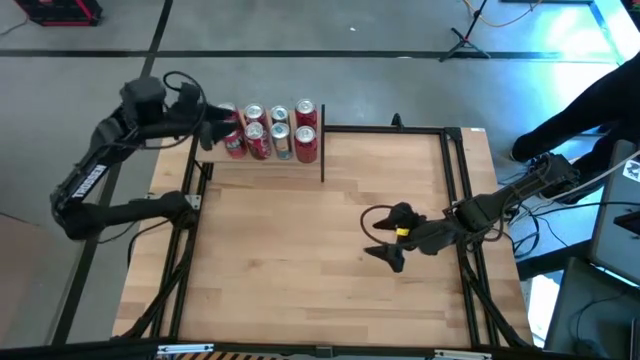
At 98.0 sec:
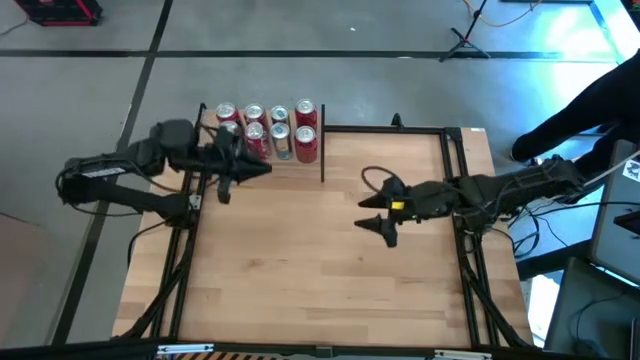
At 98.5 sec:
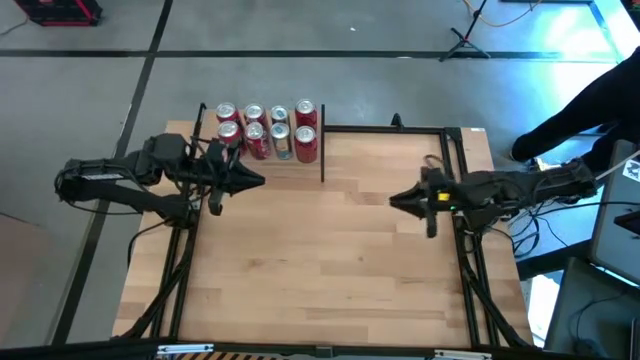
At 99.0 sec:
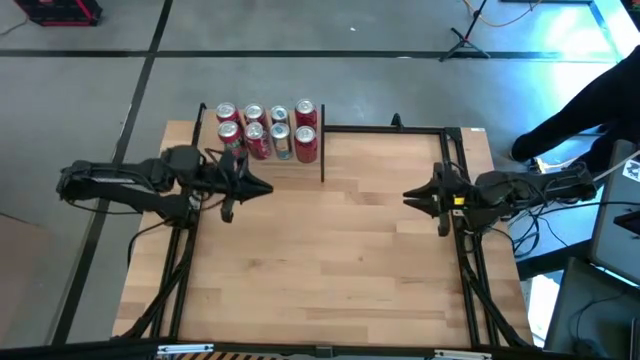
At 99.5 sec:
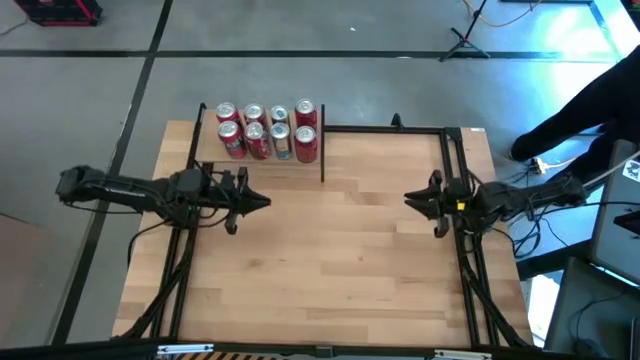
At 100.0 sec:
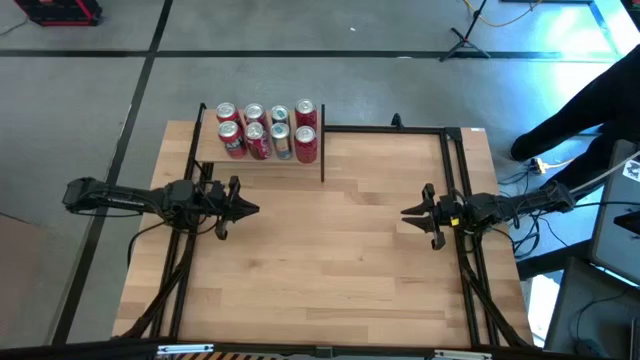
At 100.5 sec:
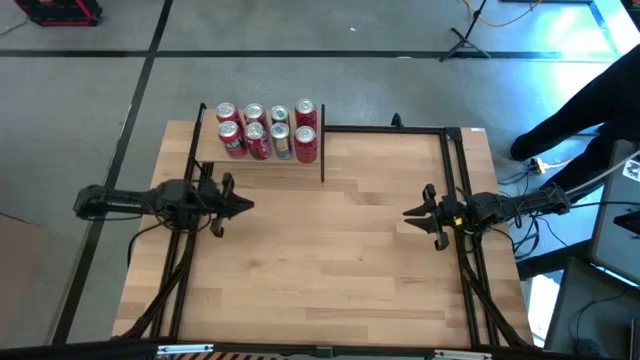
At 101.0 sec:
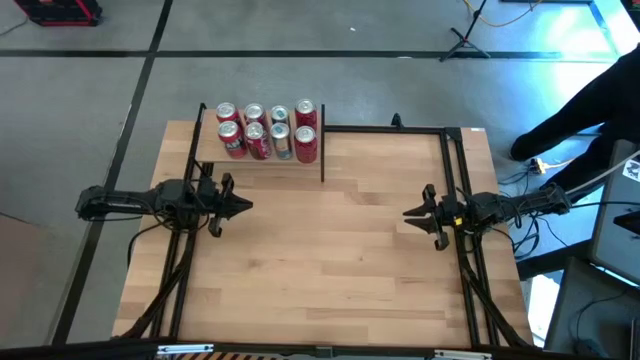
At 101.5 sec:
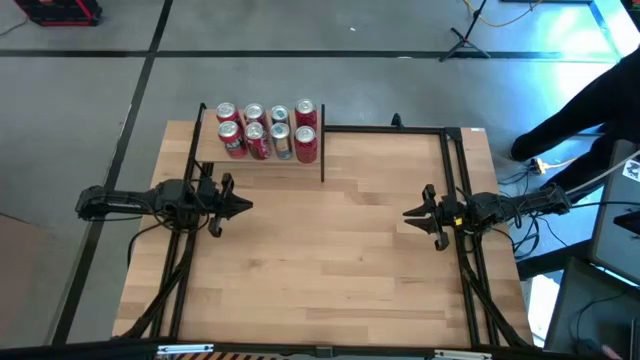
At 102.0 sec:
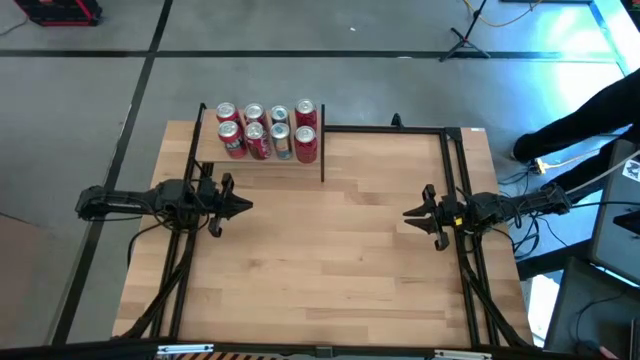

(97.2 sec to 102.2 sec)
Task: Place canned beverage on shelf
Return to Home Position

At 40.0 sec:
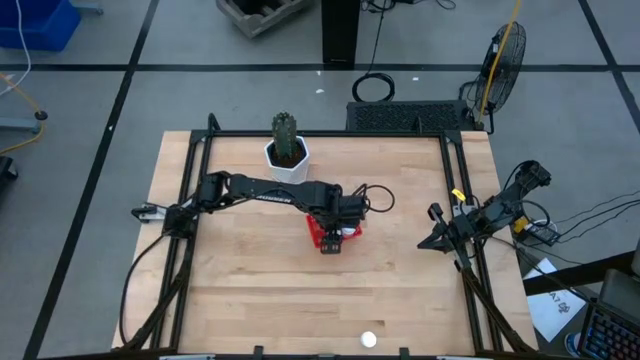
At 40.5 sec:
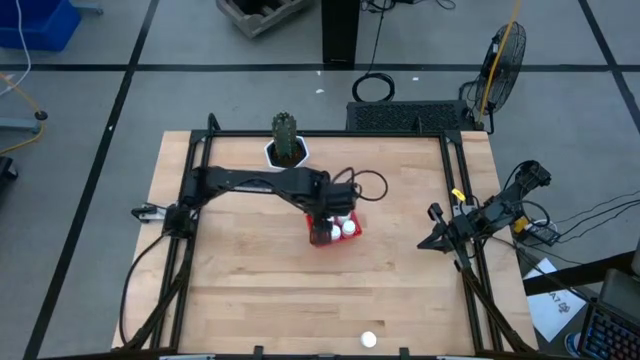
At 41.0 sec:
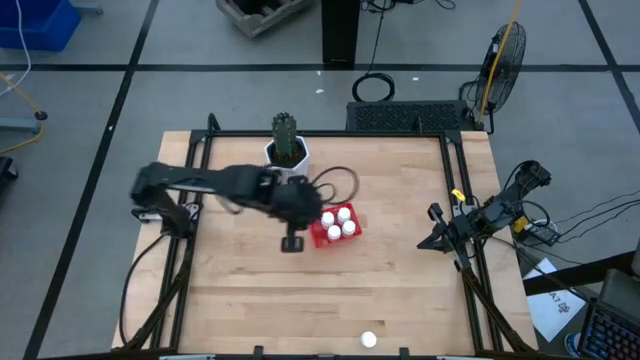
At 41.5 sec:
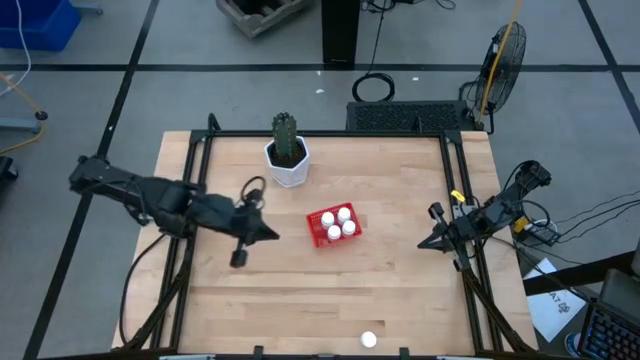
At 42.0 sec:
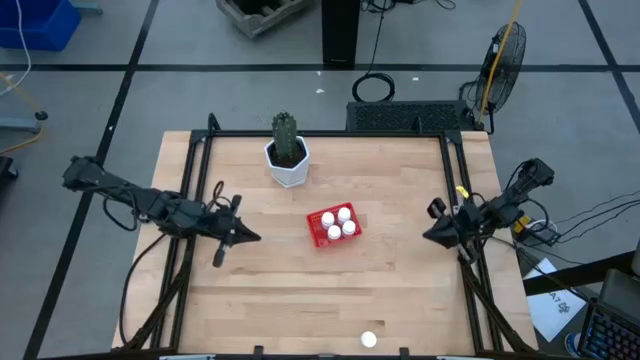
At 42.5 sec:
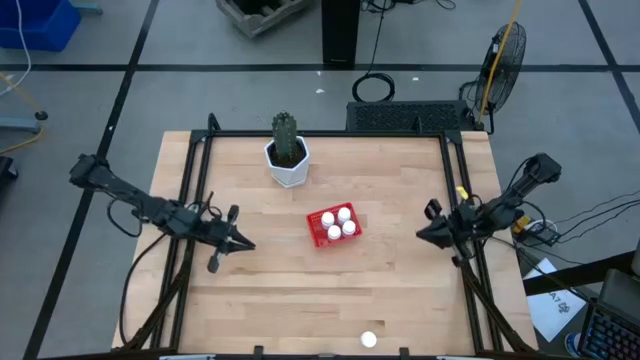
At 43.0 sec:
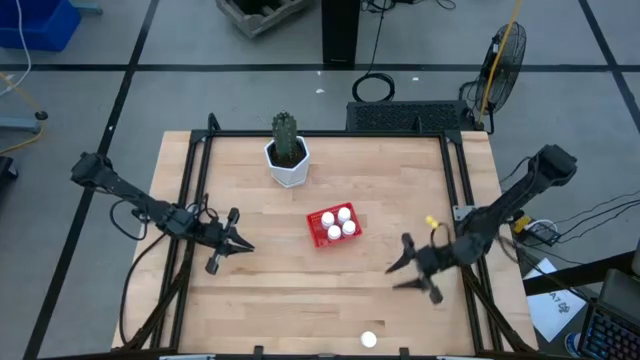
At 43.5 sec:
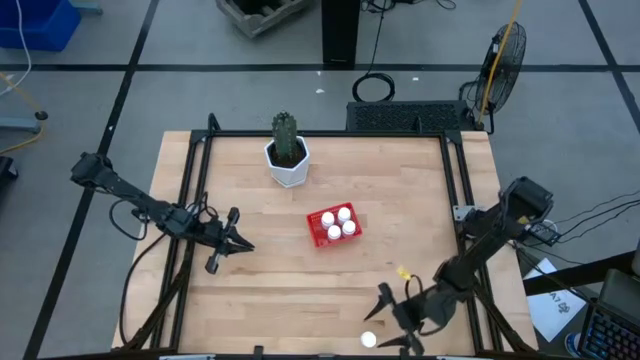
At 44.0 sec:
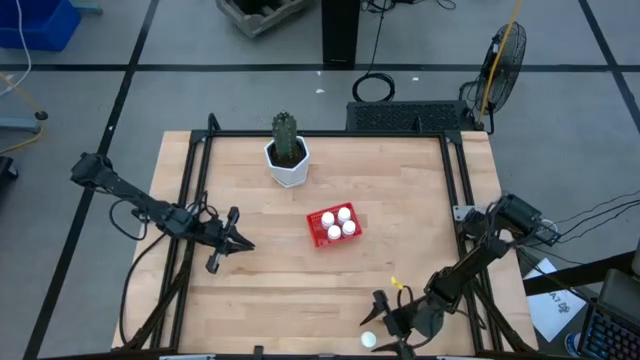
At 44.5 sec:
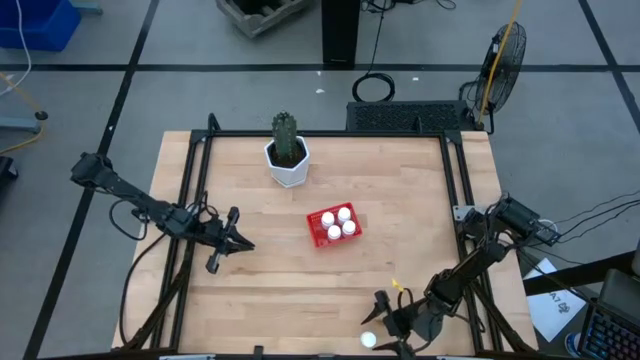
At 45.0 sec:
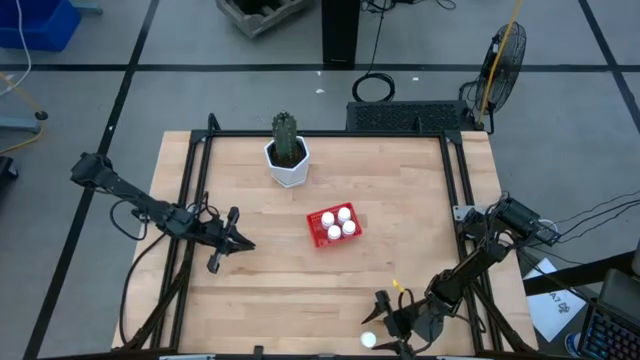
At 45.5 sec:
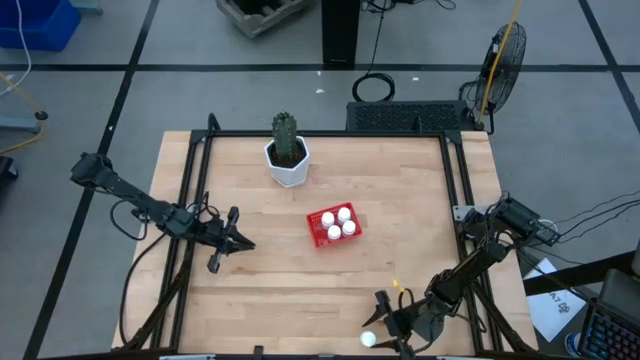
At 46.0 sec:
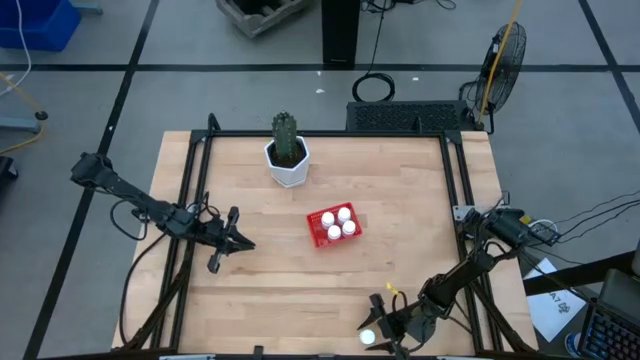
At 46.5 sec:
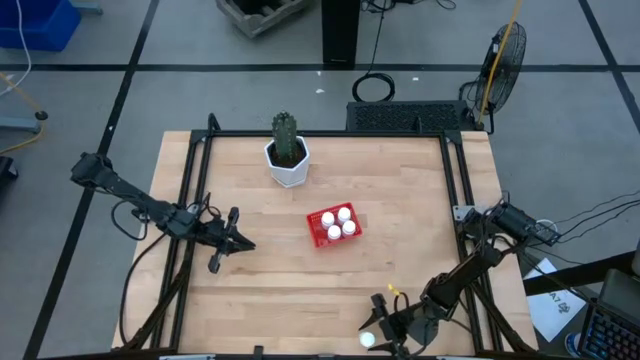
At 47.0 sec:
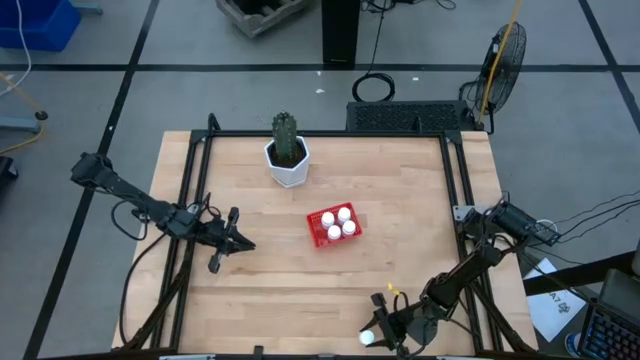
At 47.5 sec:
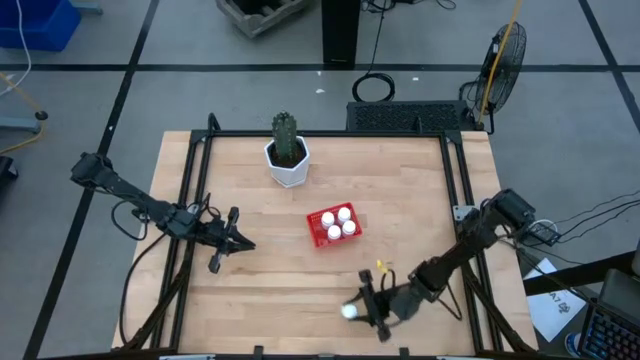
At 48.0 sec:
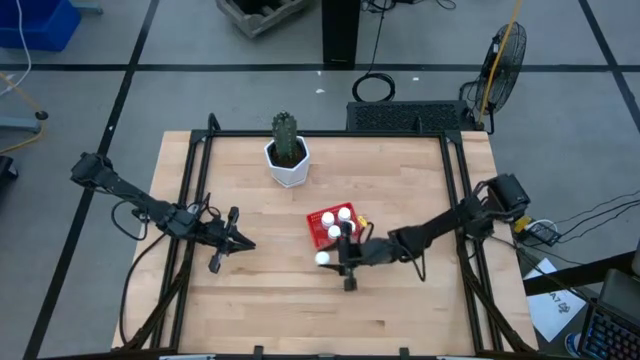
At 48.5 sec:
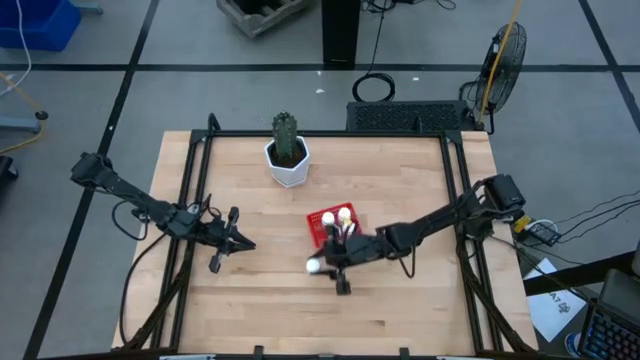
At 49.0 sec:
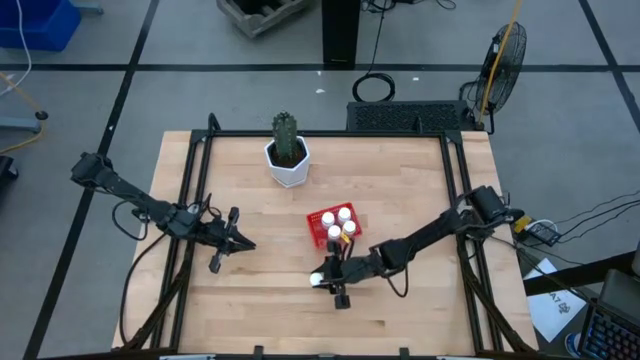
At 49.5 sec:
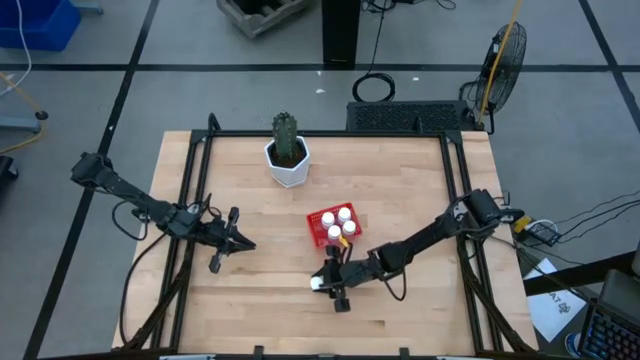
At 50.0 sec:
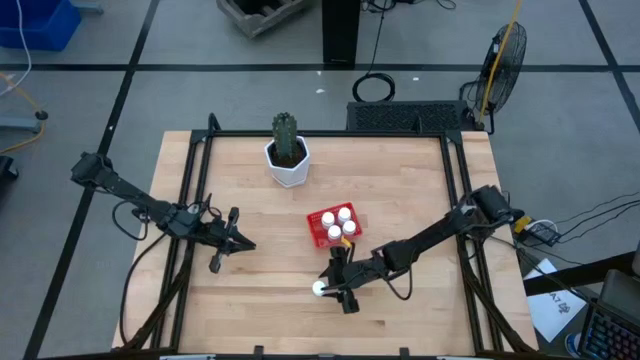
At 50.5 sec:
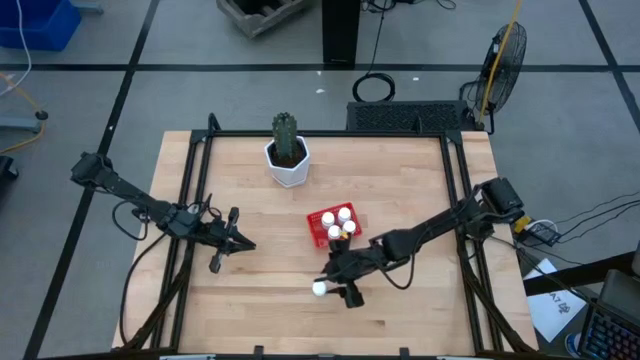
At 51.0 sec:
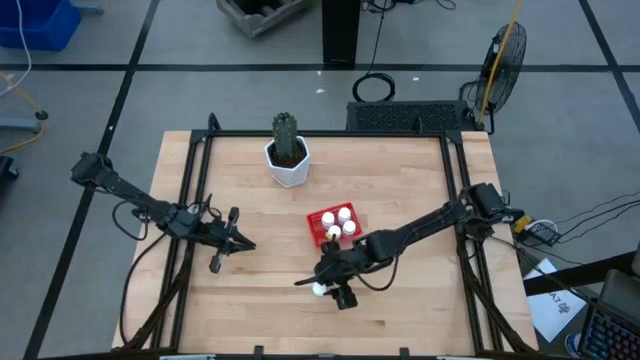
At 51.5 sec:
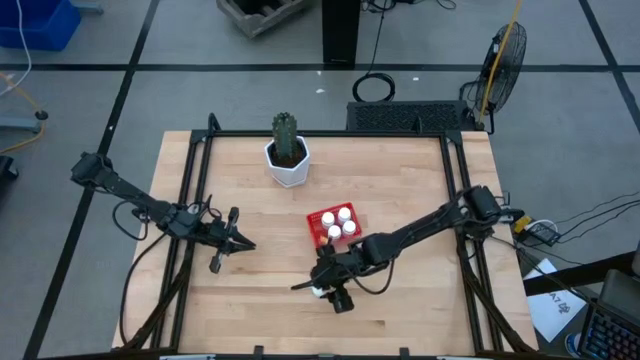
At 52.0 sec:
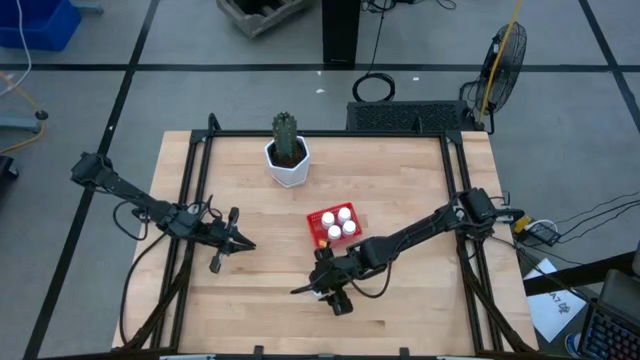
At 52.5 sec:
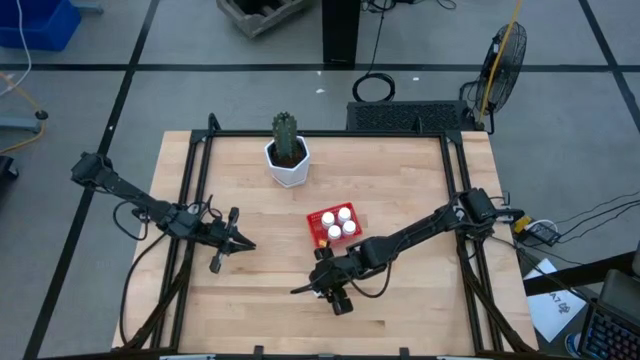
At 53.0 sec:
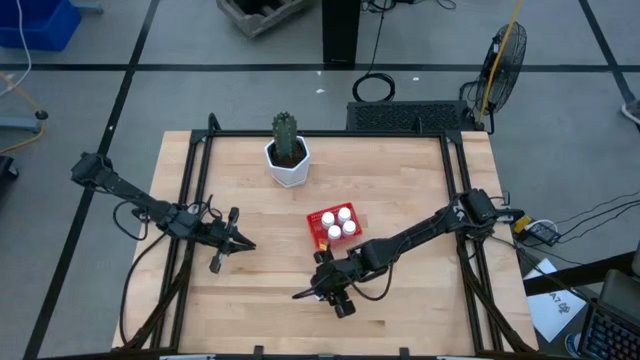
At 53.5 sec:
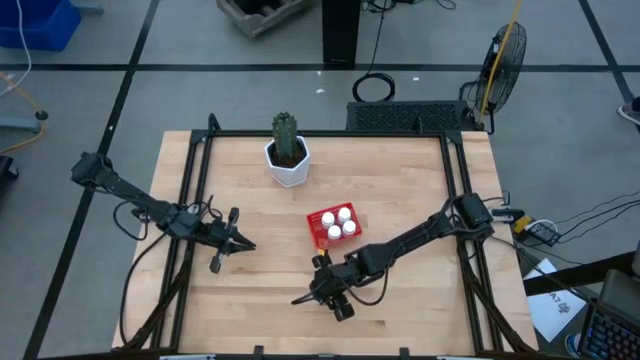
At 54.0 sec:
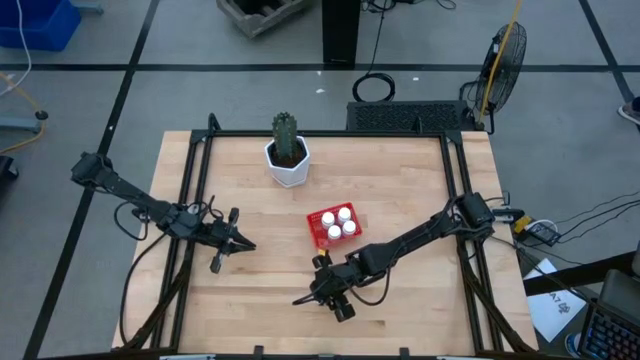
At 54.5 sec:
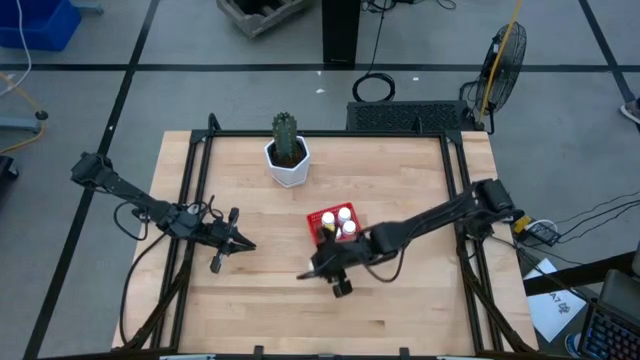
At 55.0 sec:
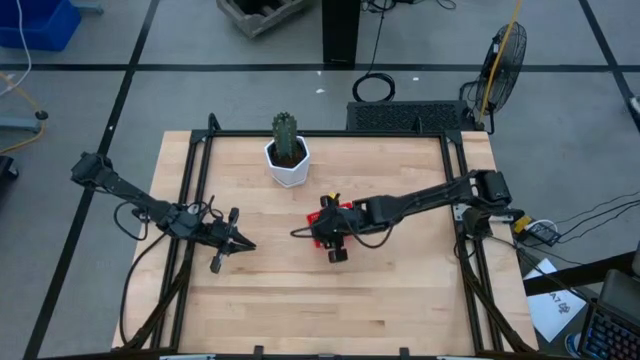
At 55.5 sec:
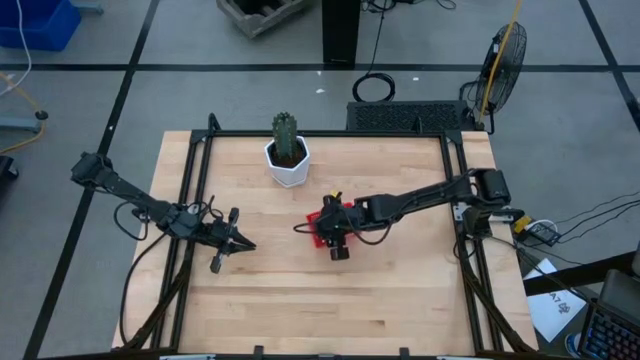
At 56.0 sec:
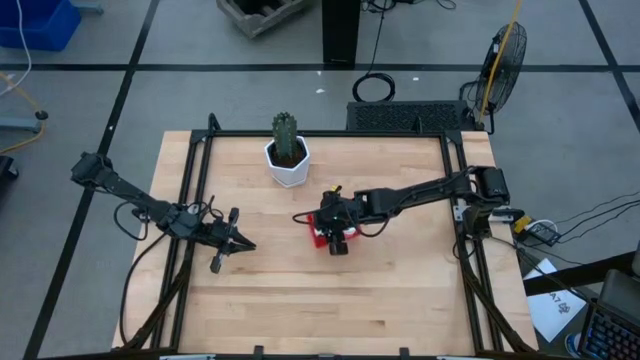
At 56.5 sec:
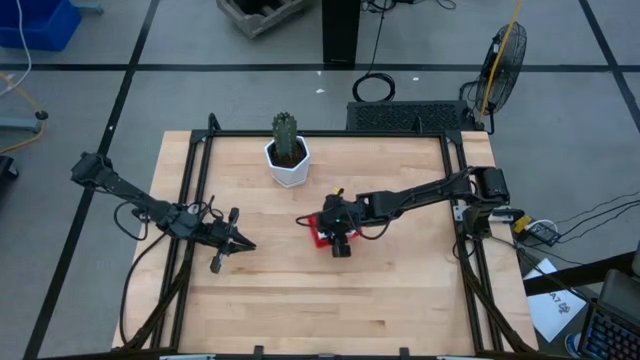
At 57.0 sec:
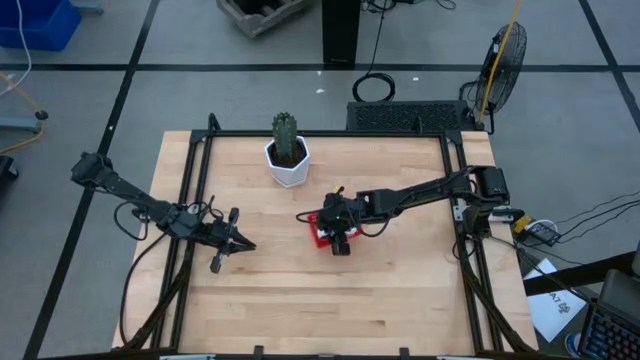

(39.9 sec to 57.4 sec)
Task: Pick and place pill bottles into a basket
Put the white medicine bottle into the red bin
